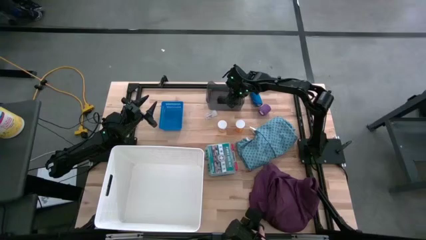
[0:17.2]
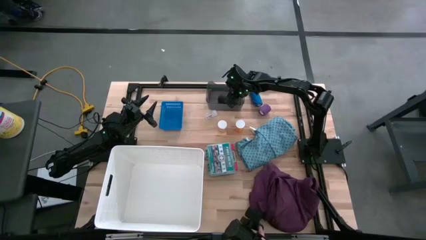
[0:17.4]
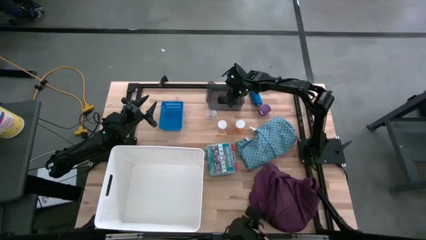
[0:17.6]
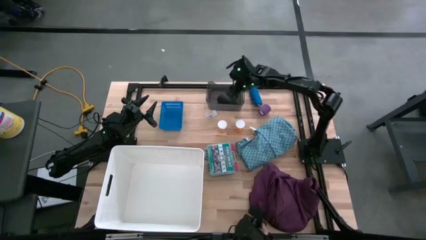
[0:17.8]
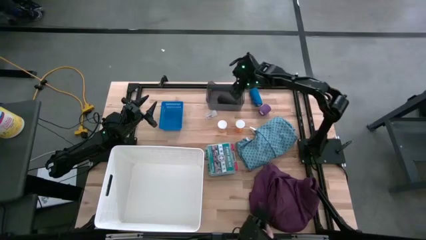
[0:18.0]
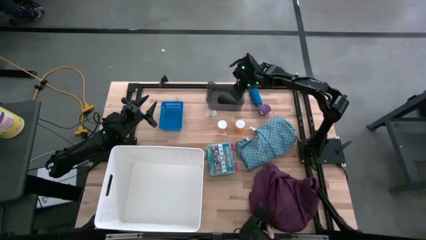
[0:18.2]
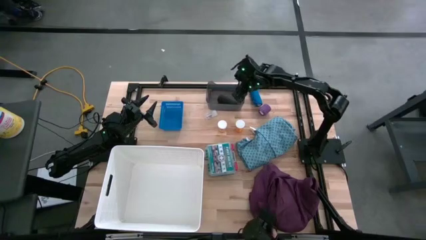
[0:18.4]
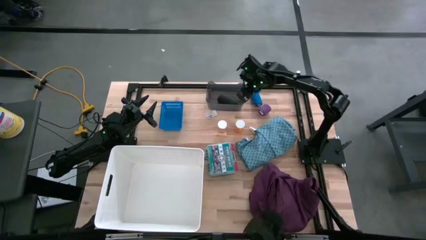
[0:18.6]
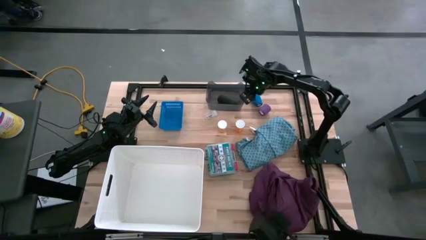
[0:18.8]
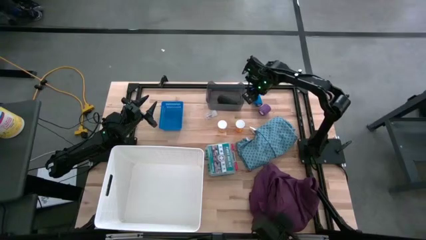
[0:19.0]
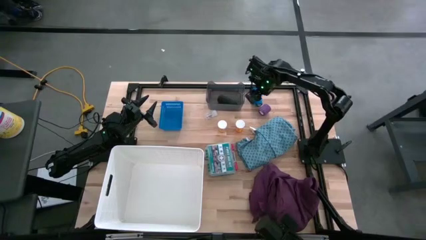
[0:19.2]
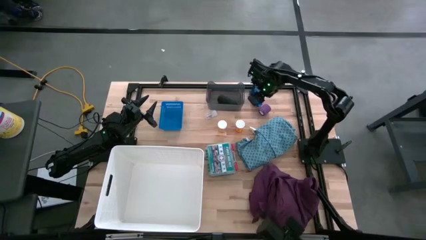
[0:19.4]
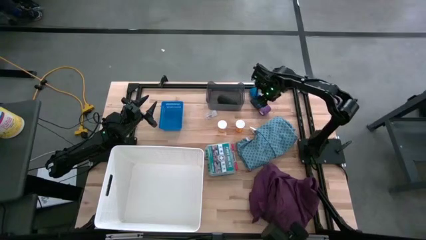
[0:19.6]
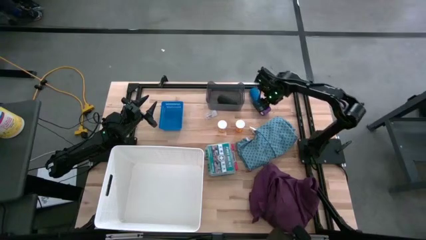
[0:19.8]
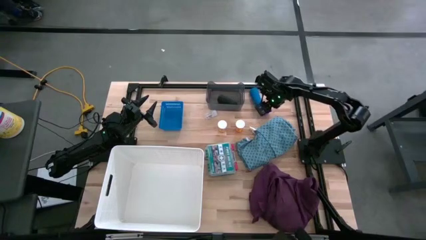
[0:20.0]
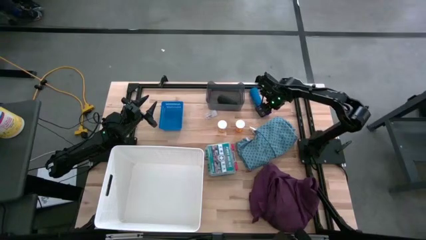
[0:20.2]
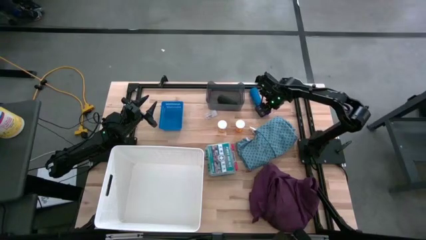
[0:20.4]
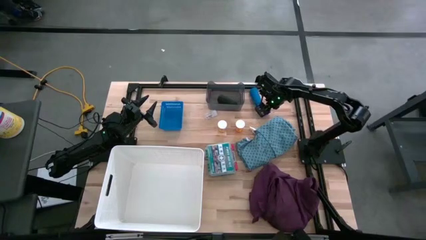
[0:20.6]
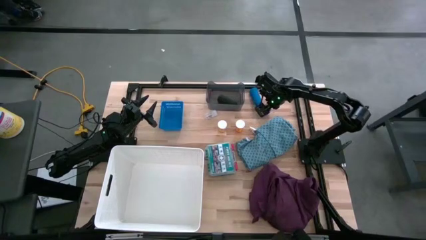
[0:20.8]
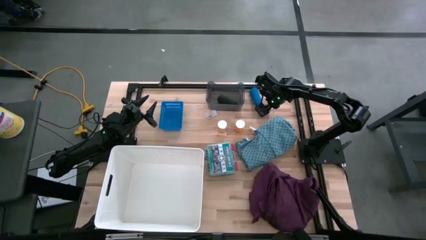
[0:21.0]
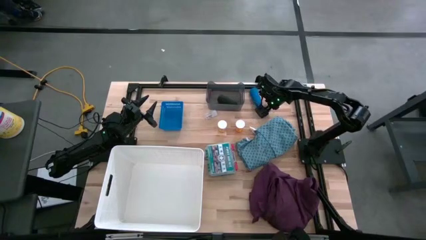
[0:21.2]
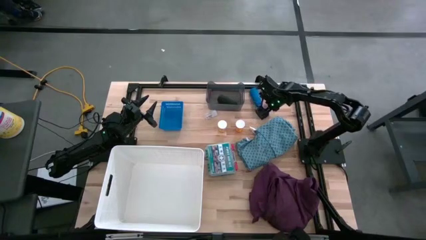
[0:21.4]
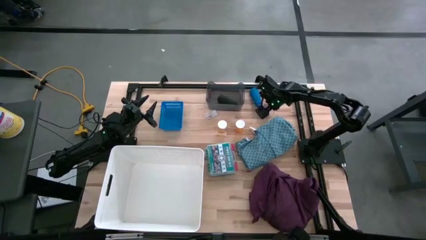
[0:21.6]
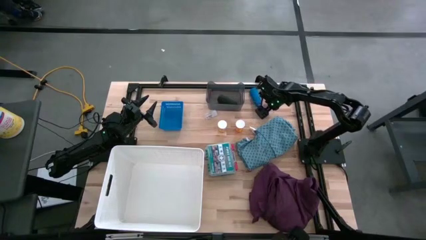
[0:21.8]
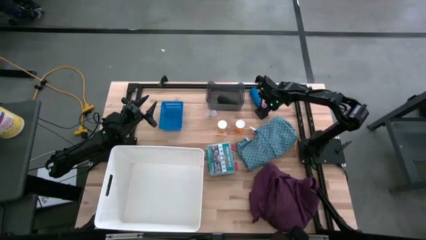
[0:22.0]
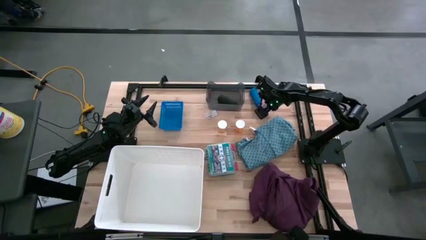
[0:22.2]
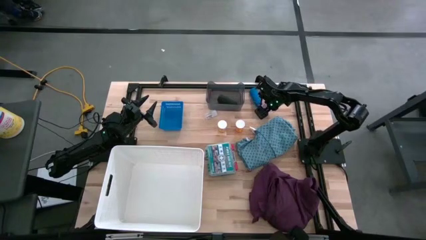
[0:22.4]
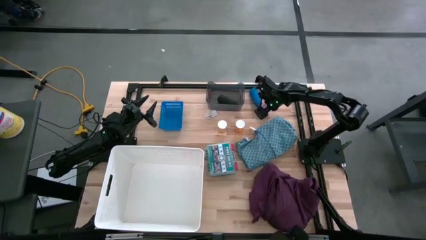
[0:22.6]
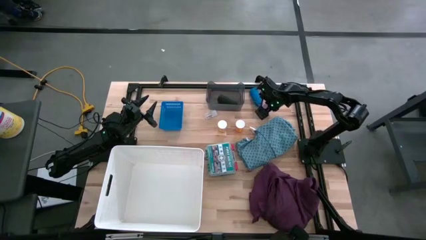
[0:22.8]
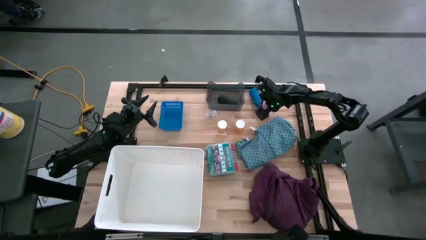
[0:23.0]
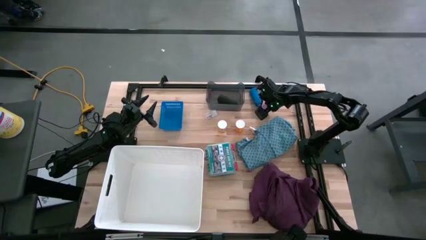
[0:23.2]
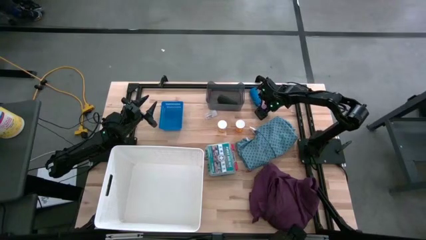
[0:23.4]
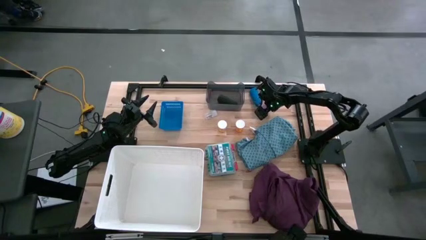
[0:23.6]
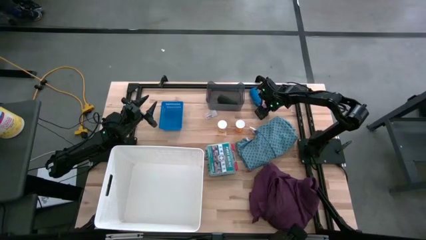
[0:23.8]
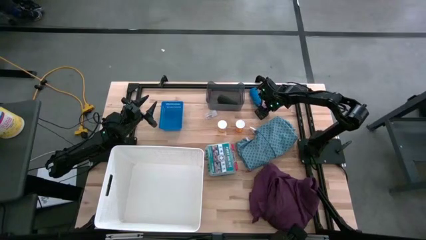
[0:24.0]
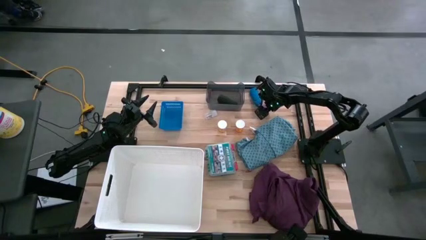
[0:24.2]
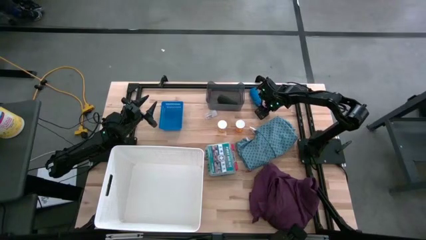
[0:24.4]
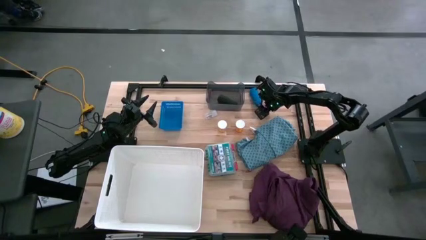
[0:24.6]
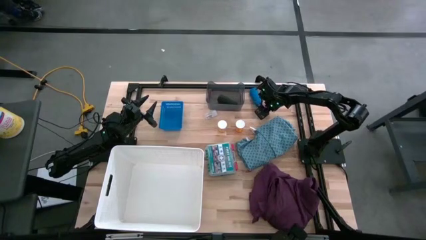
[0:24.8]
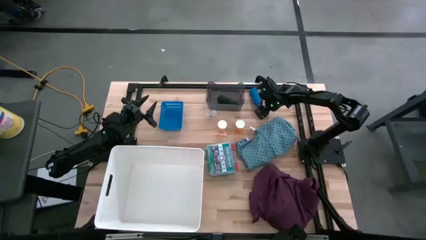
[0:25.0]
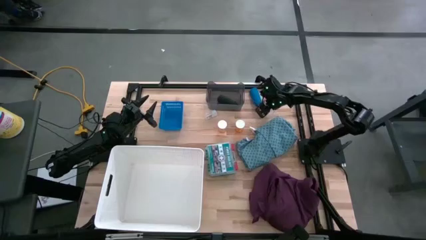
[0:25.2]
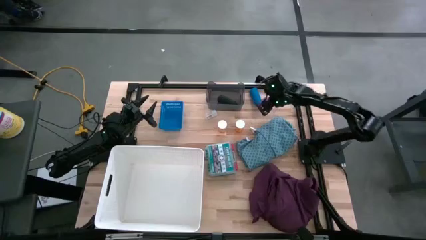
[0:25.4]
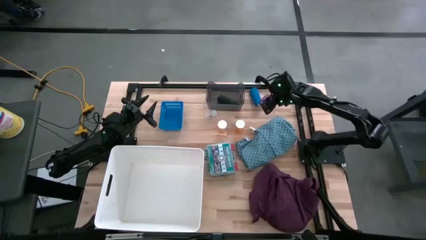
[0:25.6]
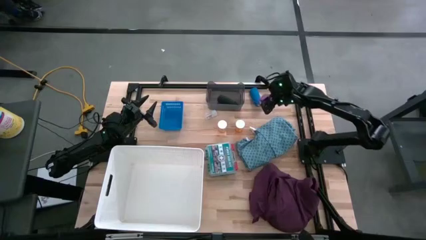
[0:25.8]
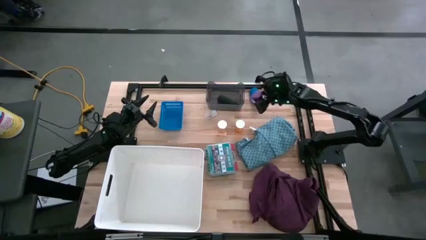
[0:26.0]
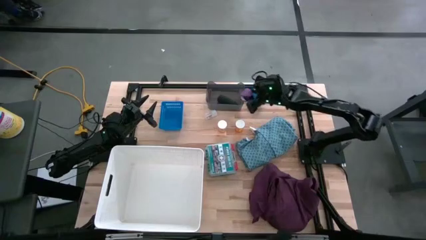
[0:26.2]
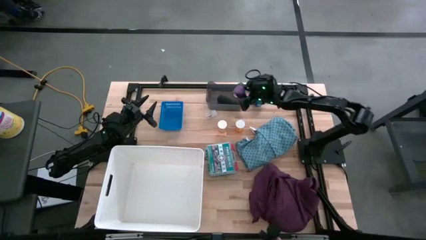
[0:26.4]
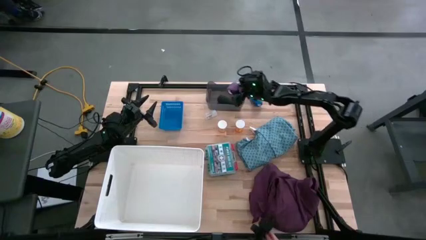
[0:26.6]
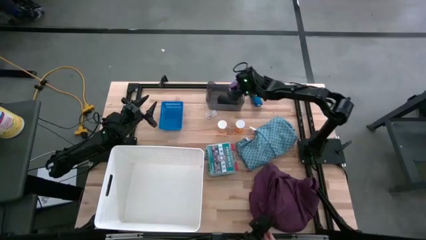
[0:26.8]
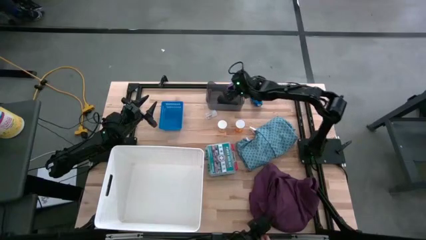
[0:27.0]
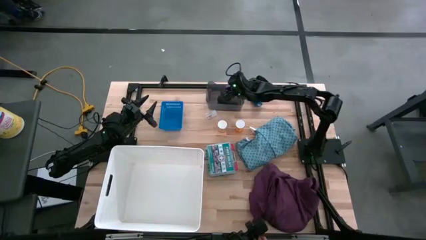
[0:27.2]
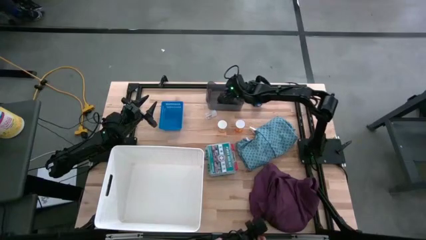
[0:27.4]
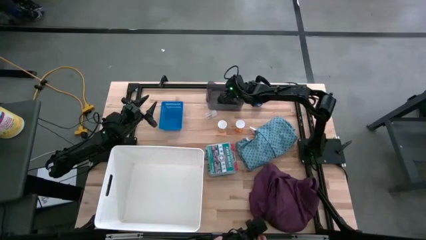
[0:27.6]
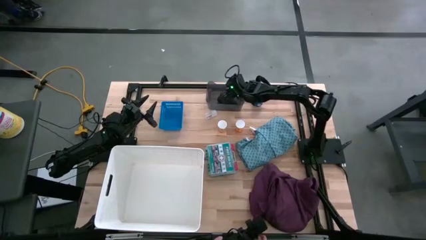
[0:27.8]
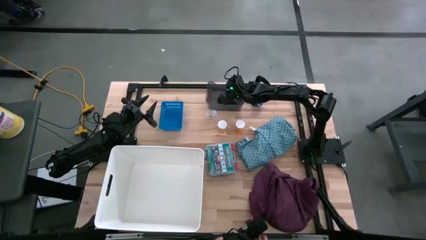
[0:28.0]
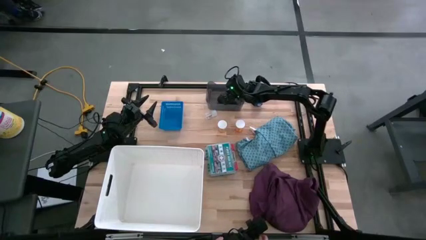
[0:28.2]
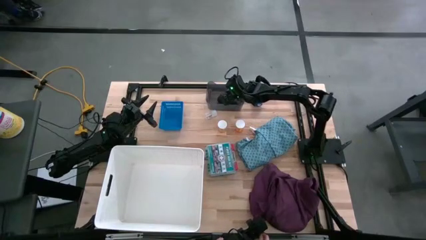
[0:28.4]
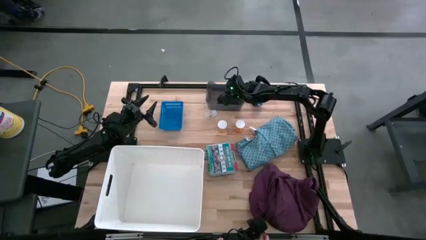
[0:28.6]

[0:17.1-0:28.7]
Task: Pick & place medical supplies in basket/bin
Put the purple bandage into the black bin

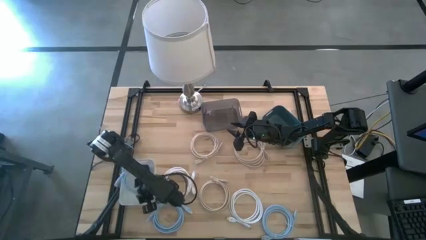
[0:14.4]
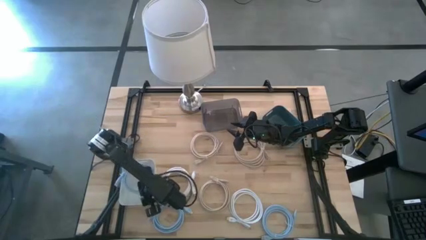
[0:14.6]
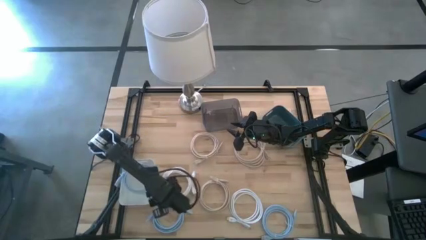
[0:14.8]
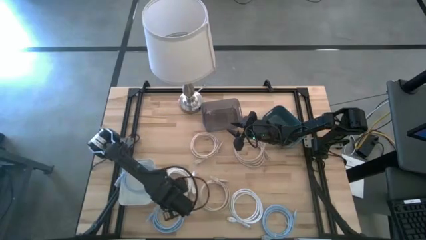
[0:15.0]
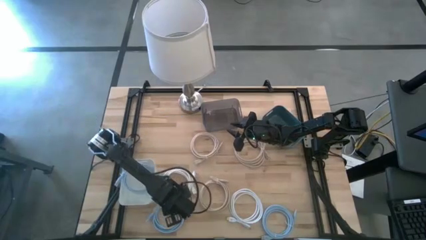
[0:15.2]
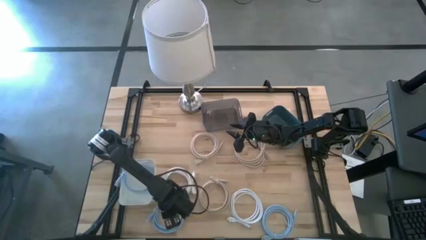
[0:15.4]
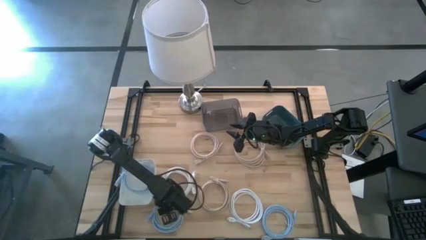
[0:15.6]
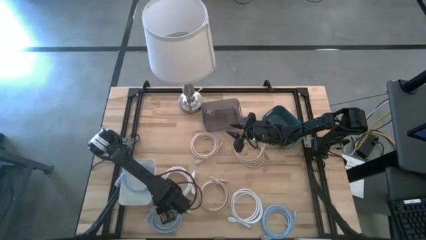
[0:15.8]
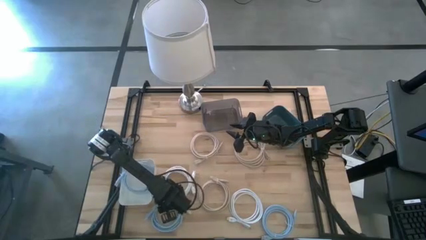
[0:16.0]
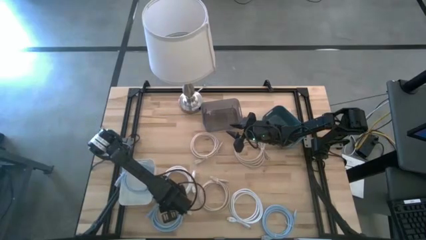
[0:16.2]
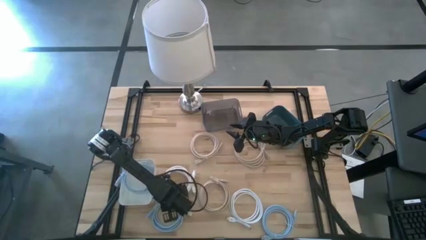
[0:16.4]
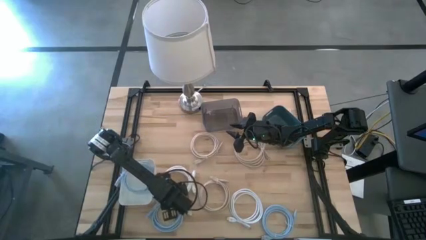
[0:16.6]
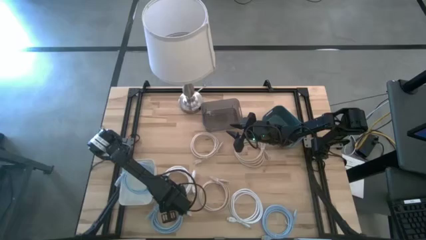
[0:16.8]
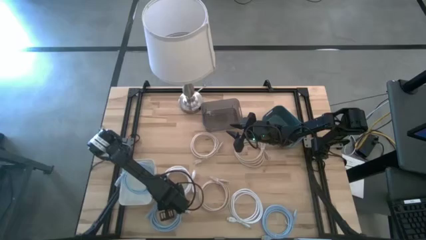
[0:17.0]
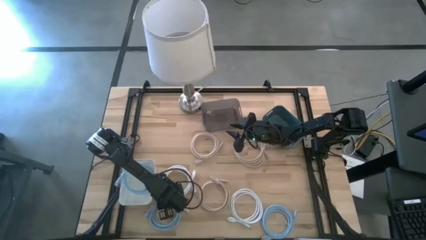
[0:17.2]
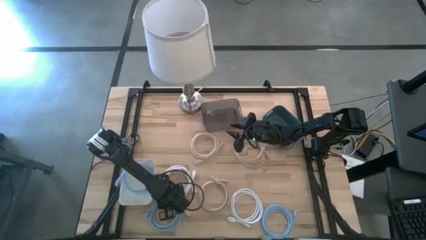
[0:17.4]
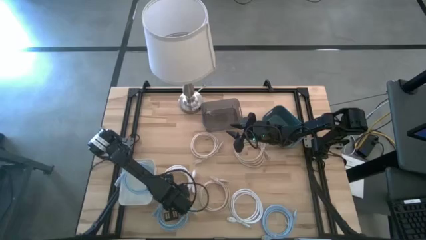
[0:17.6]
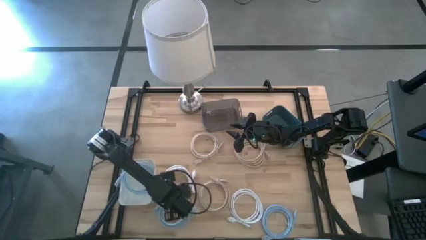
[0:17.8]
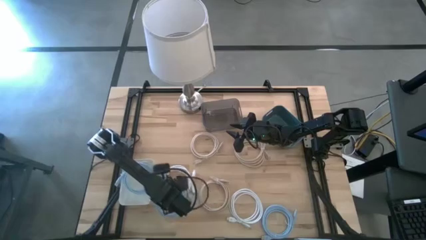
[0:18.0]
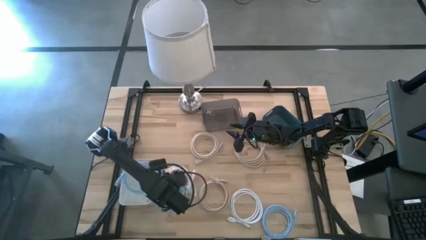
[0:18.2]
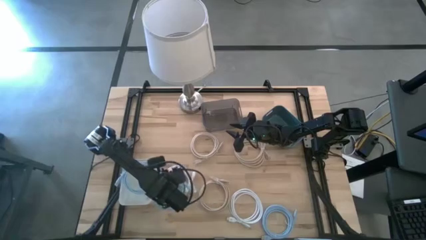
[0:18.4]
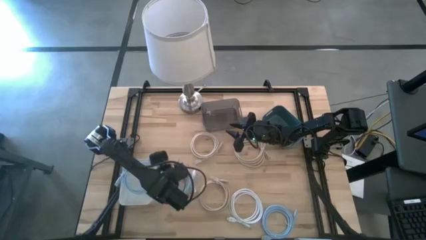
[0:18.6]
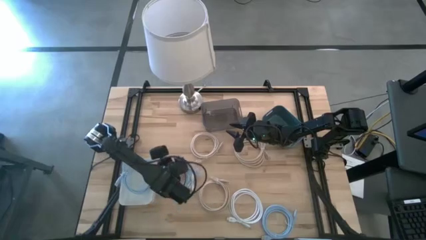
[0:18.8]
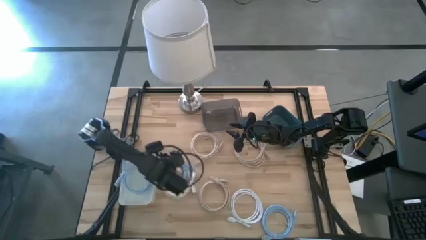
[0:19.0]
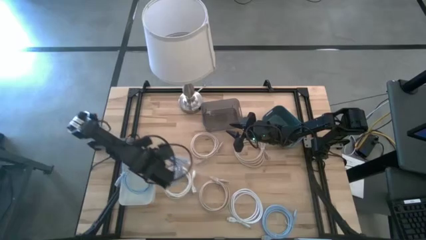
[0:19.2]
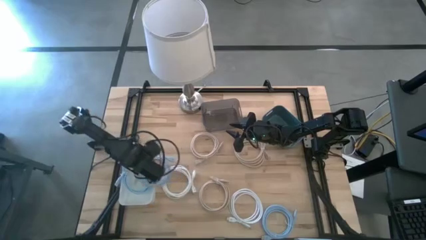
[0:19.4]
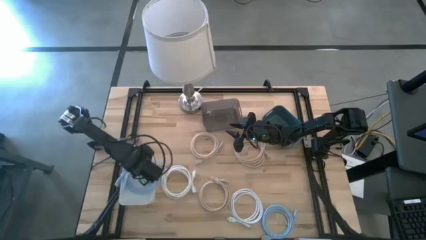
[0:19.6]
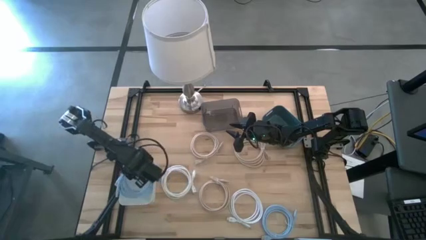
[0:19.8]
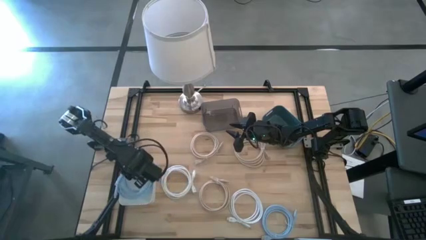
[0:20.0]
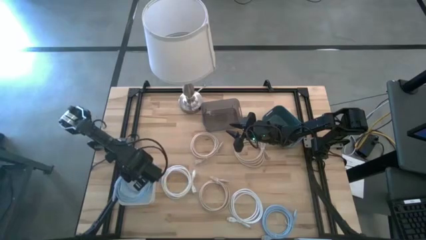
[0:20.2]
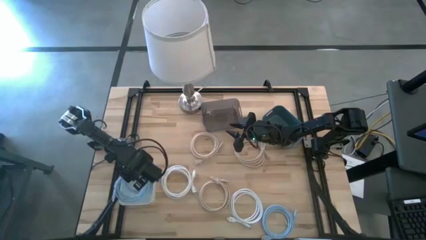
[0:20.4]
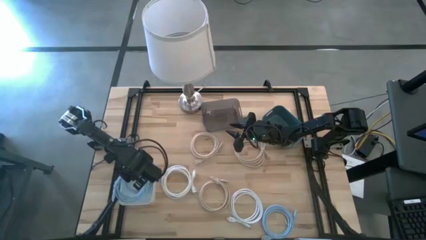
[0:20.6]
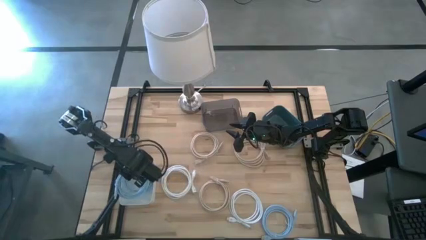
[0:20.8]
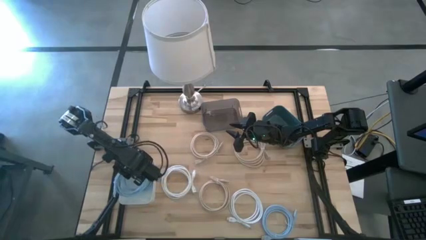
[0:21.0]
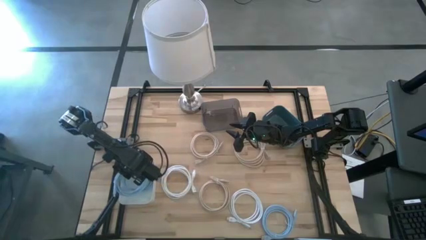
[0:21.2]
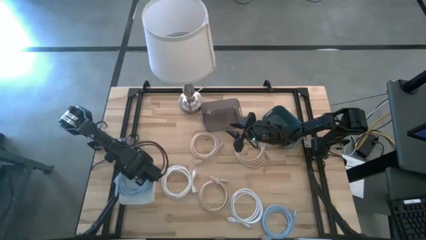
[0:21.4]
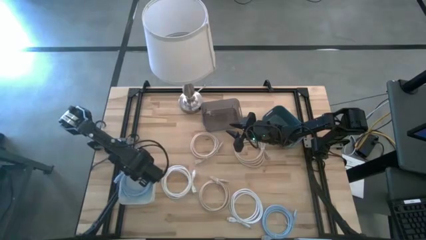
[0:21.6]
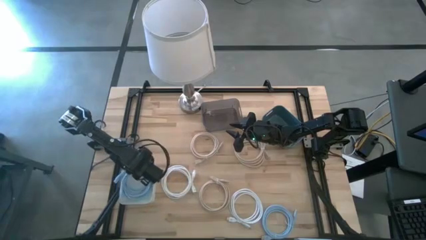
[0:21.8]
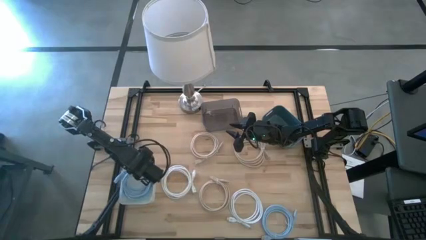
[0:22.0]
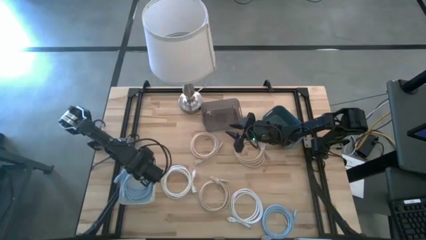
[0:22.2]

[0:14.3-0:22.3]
Task: Sort HDMI cables
Put the left light blue HDMI cable into the white bin
